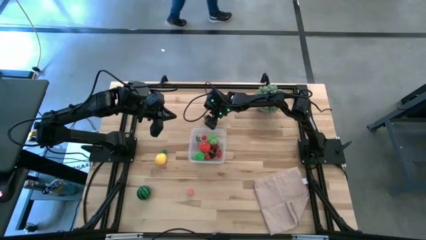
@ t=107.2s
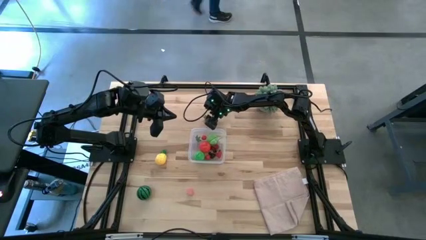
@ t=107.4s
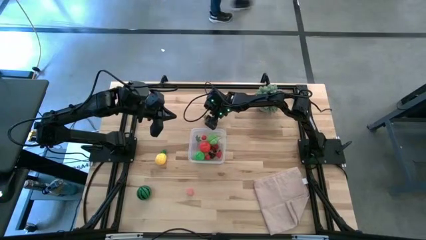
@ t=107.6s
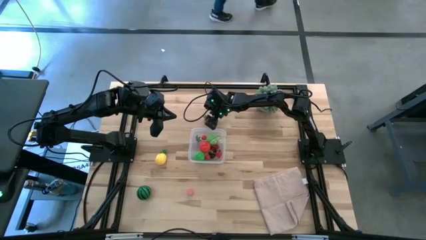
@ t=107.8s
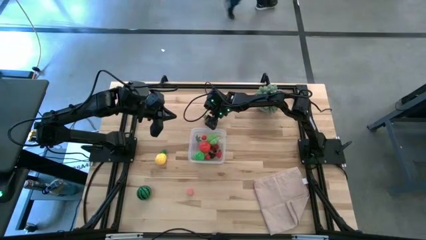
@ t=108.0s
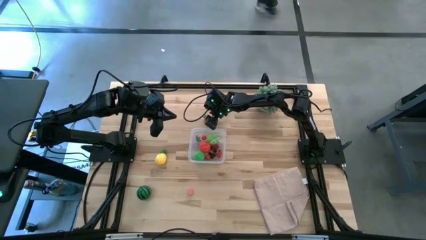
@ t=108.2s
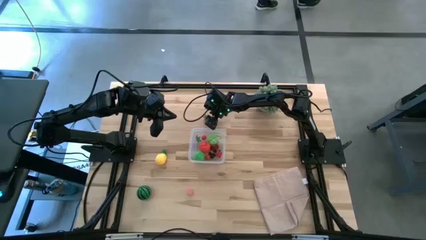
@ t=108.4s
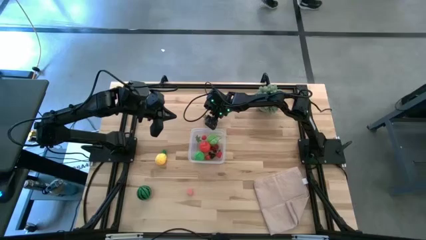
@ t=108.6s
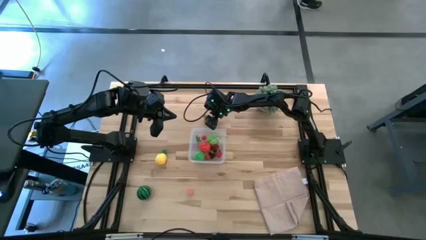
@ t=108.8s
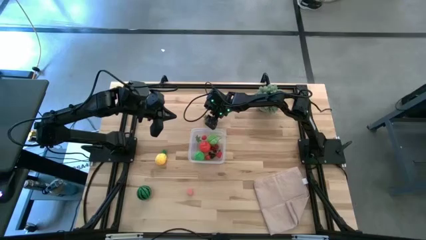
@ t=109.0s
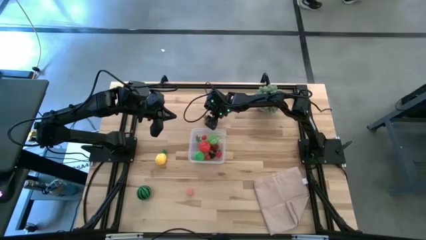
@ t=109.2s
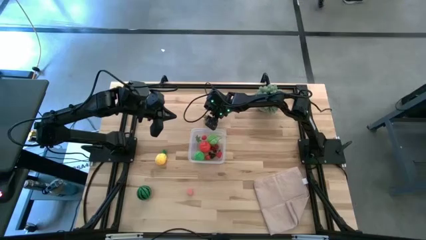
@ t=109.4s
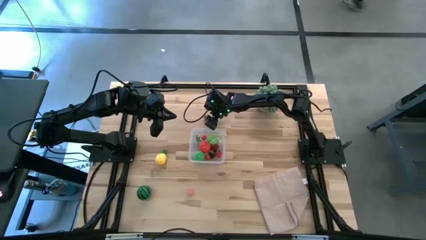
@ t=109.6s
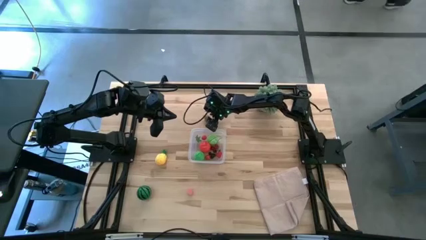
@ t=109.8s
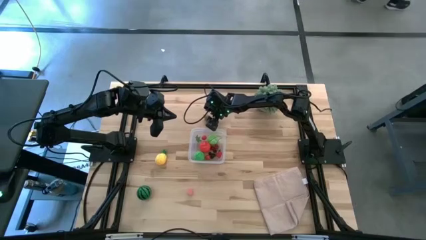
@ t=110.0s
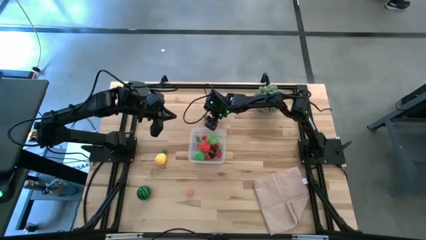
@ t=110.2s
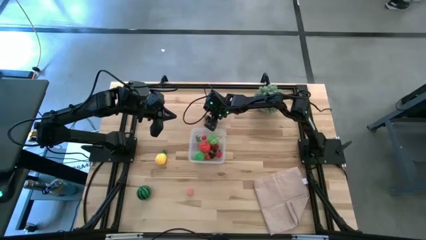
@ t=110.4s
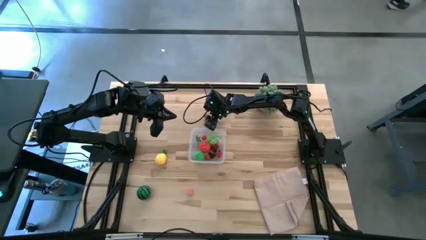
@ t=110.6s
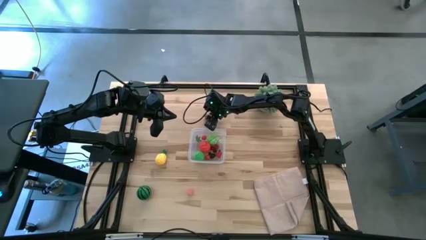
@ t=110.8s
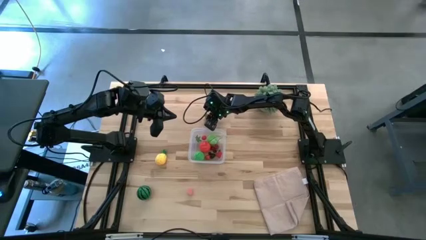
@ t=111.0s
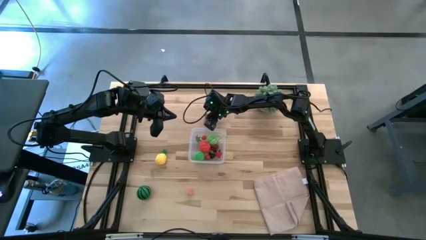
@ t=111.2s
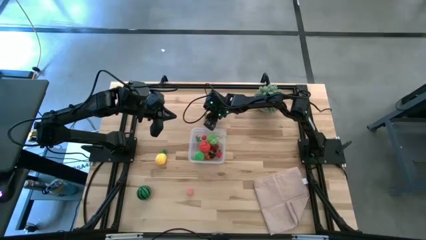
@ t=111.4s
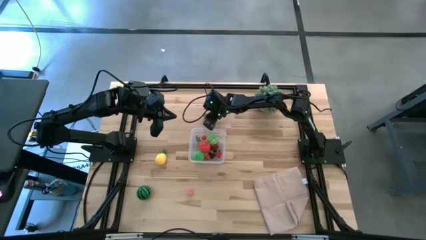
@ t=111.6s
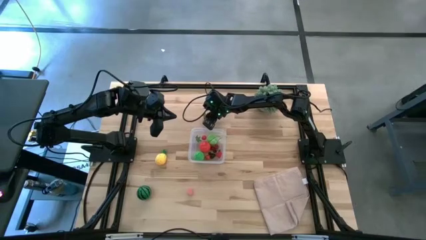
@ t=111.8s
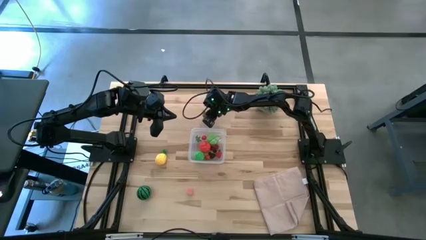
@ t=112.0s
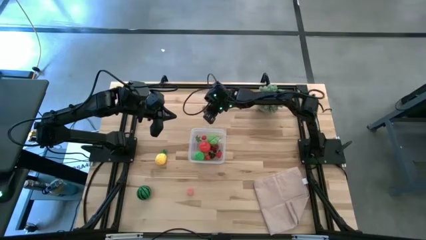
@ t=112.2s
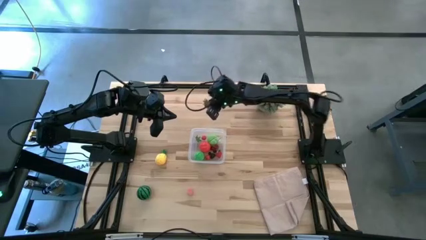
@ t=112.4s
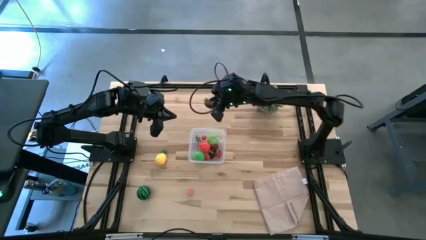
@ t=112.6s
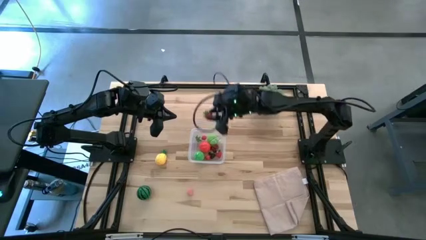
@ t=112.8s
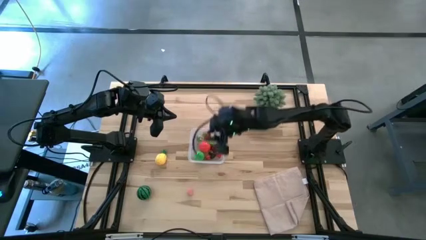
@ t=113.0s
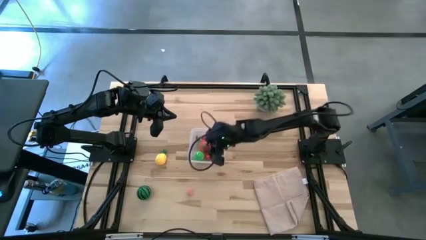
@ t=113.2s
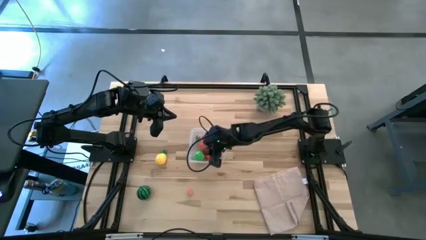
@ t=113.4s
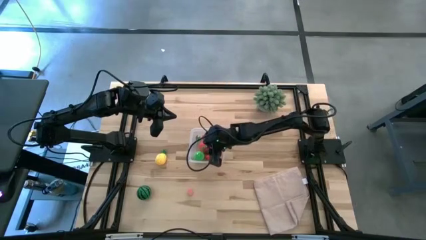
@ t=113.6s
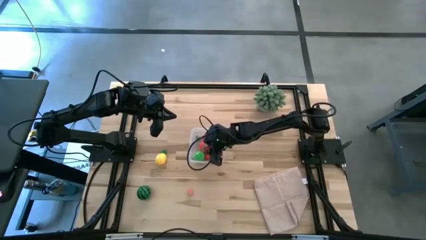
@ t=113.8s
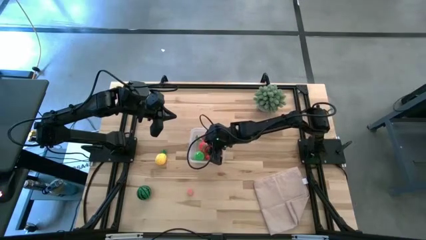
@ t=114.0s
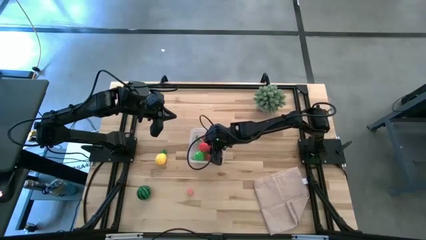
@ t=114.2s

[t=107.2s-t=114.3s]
Task: Pick and placing Produce into tupperware
Put the red strawberry into the transparent bin

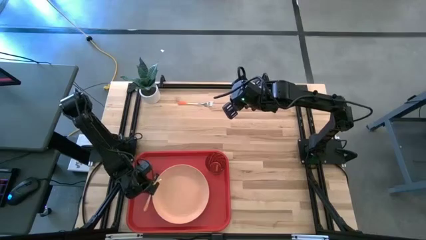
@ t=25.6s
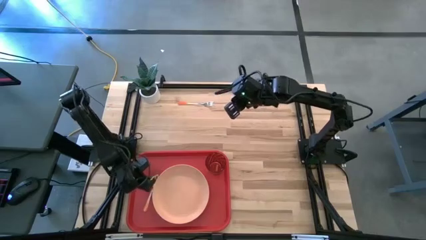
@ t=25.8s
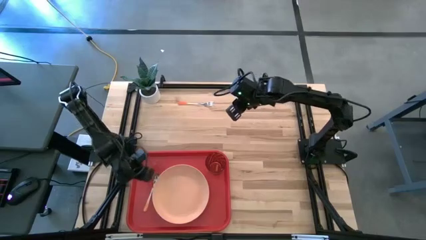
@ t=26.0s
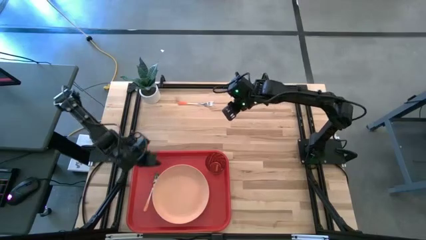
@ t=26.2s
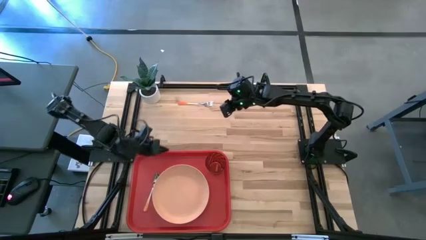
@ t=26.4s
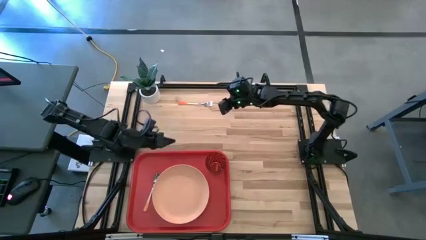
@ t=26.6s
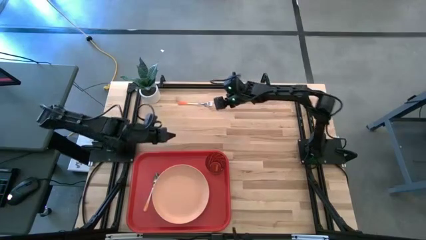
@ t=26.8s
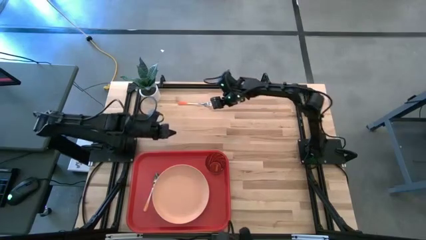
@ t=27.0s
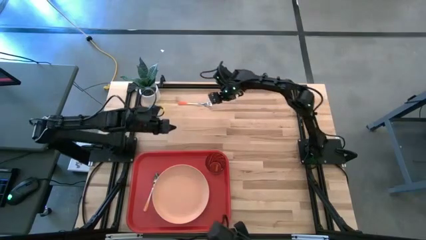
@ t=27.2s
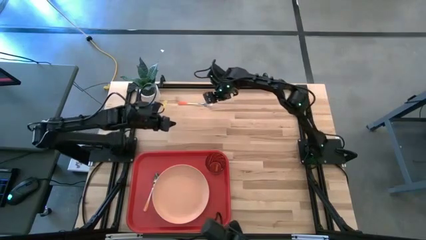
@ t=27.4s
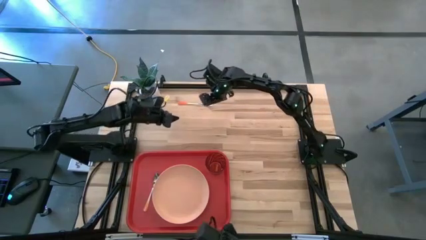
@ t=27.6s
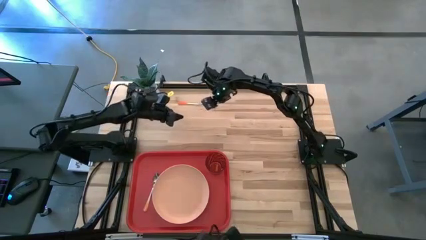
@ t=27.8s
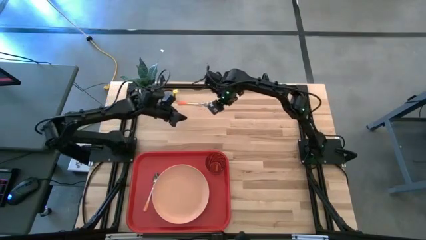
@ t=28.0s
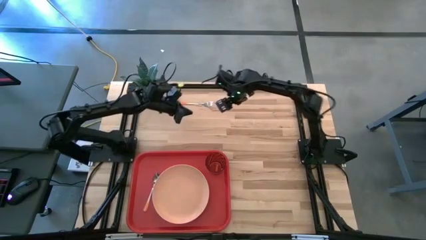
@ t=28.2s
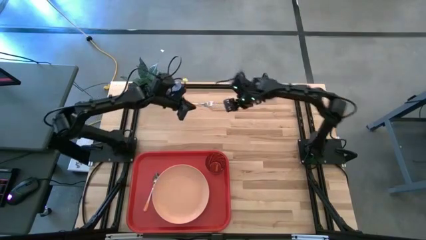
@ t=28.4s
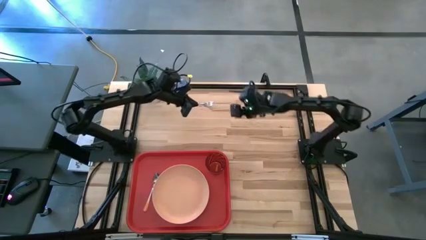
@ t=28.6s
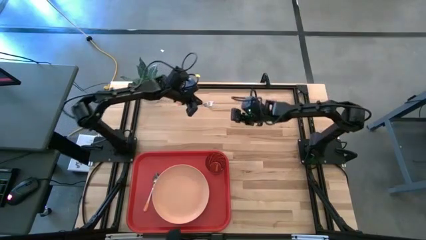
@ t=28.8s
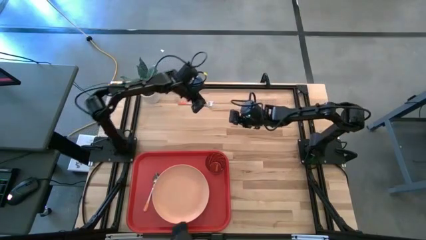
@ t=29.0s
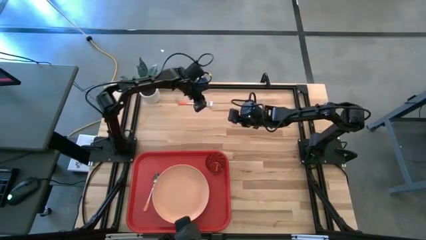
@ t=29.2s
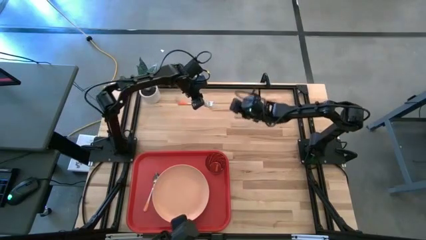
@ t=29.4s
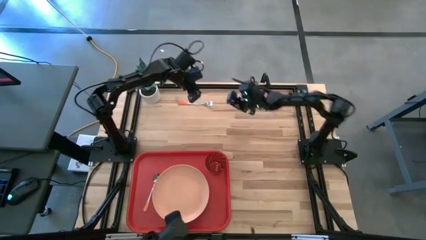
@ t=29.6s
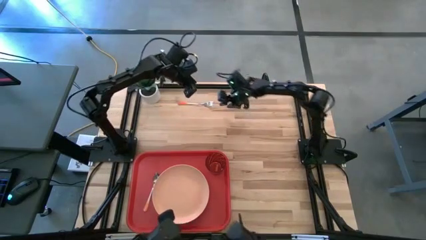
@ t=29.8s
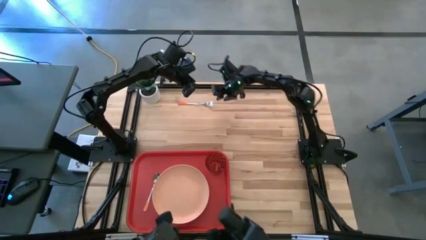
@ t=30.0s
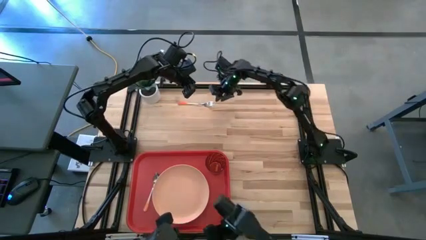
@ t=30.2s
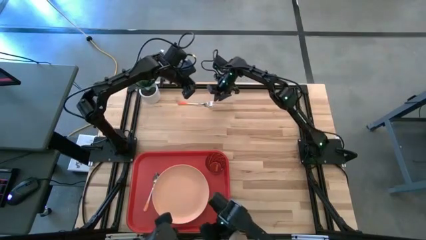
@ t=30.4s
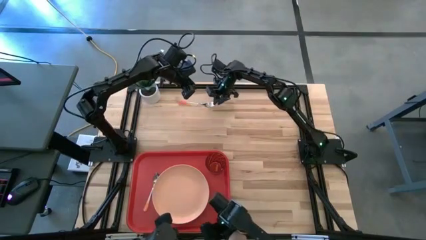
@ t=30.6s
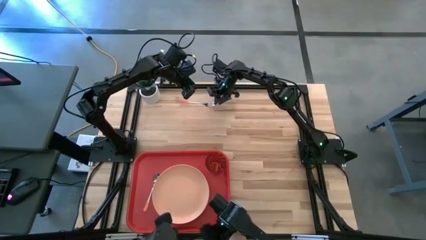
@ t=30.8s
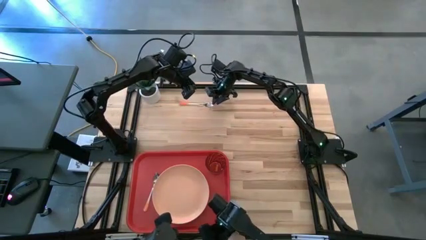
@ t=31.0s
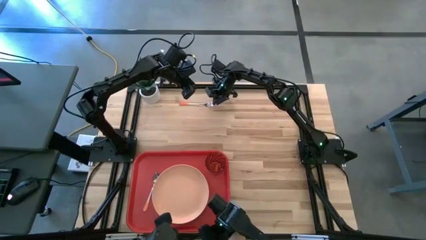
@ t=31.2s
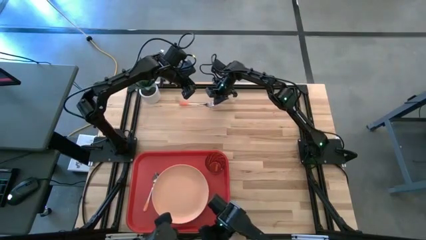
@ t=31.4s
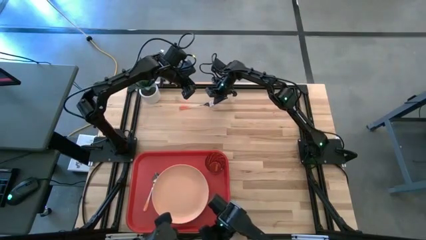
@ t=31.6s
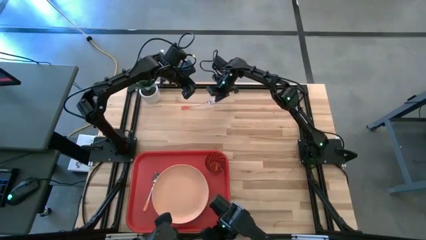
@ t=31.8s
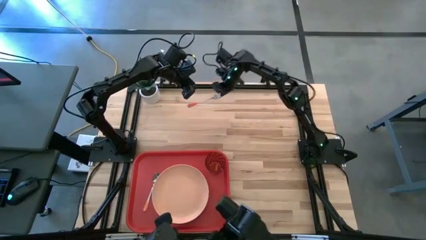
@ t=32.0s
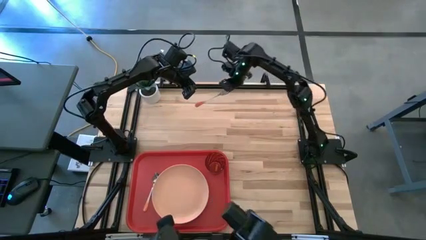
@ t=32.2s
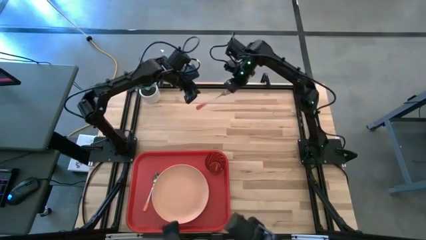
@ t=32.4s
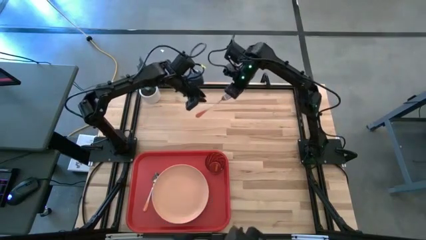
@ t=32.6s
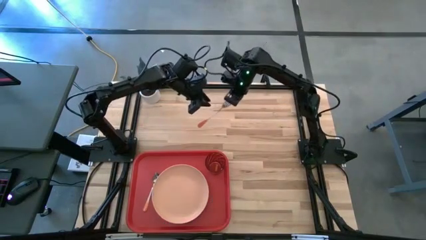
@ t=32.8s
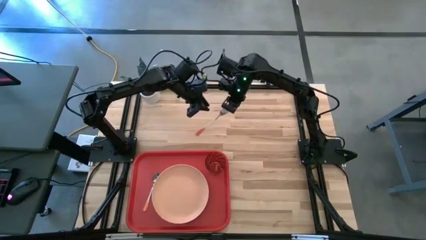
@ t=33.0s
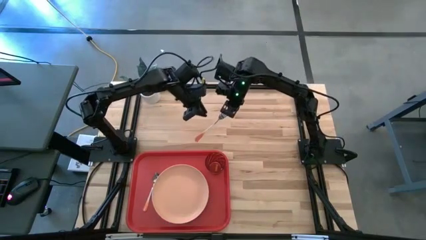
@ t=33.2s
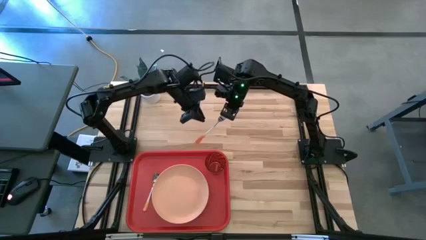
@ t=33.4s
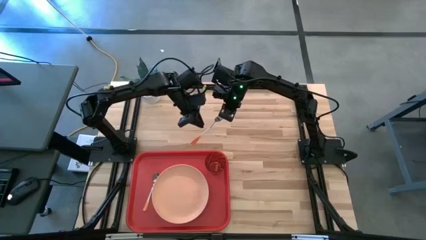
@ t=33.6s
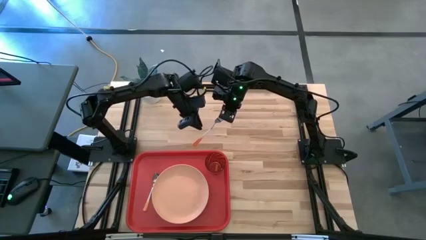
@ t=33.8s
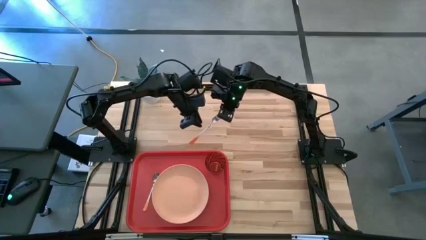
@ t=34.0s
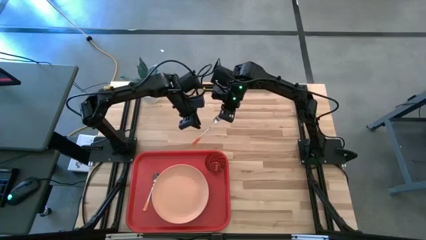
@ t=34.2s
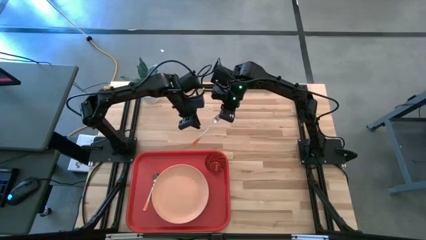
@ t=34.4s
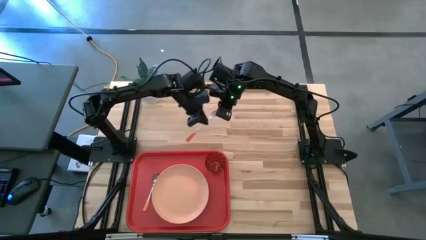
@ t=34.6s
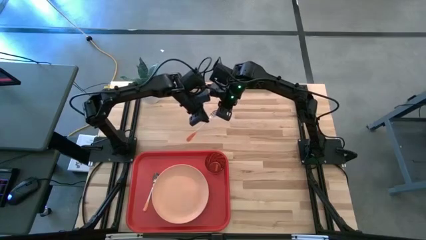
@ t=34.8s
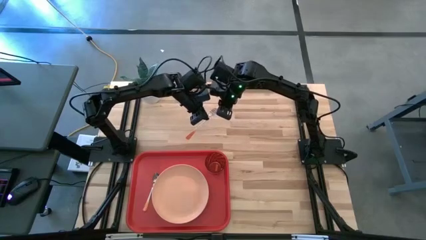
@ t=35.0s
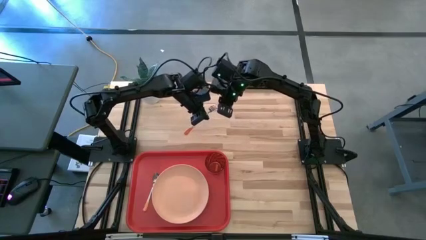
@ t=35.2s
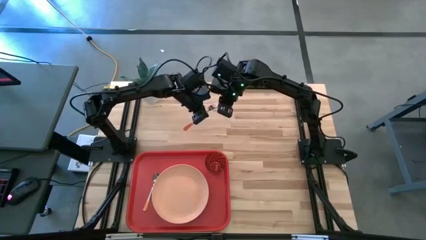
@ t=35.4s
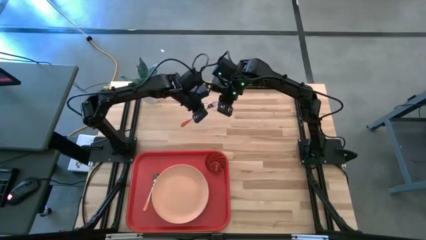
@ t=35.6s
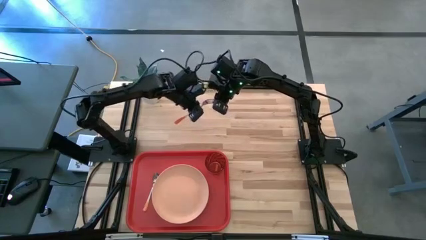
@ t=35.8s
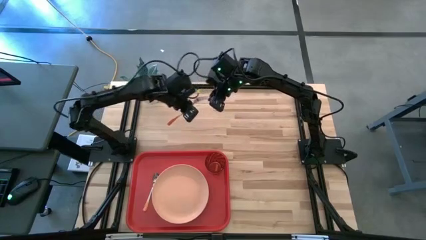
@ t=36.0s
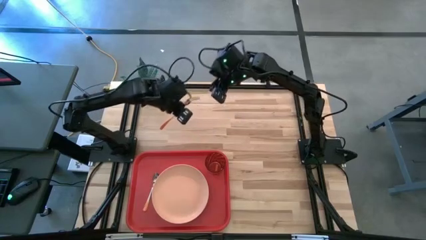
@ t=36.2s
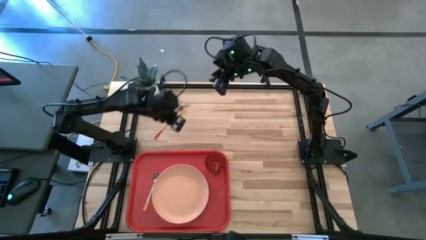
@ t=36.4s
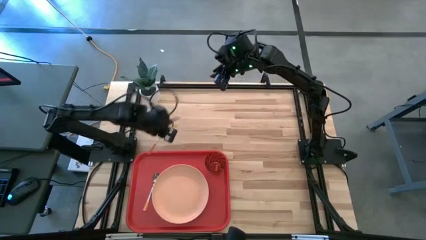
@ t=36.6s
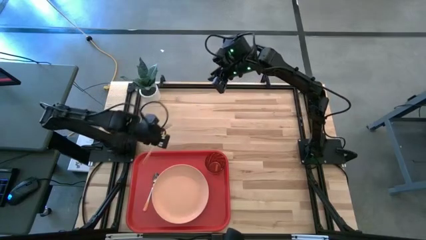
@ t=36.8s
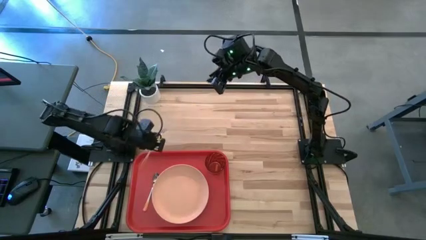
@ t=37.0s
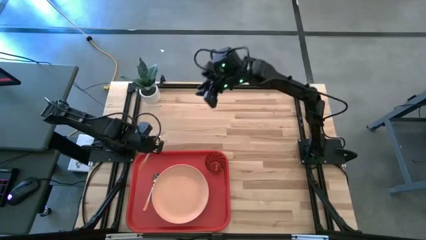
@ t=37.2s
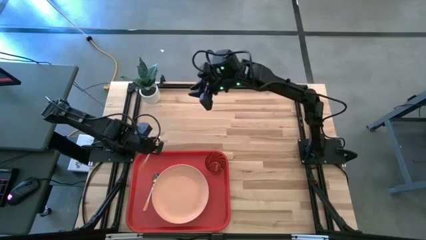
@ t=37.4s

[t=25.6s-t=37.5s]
Task: Pick and place plate/cup/fork/spoon on tray
Put the orange fork on the red tray to the left of the orange spoon
